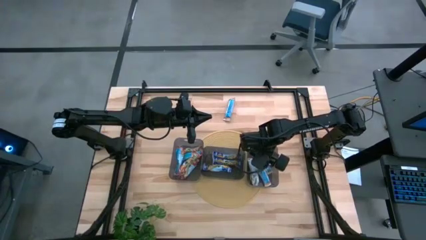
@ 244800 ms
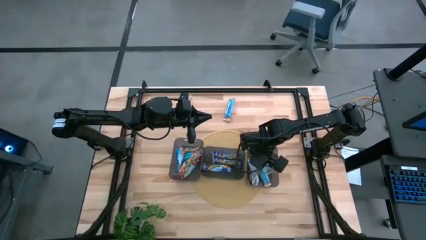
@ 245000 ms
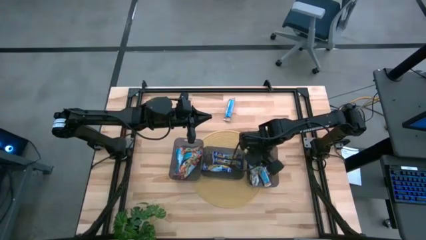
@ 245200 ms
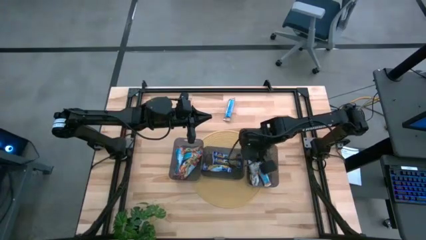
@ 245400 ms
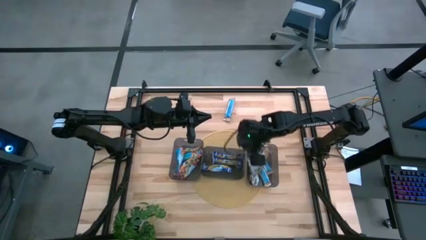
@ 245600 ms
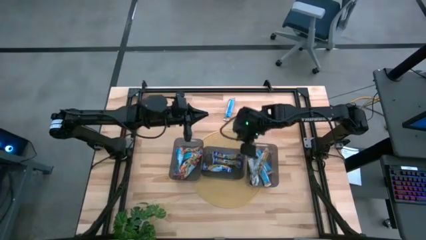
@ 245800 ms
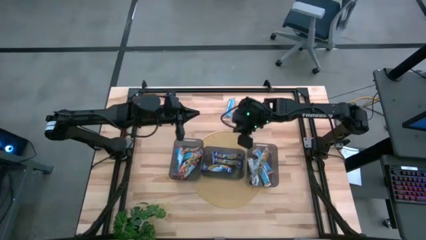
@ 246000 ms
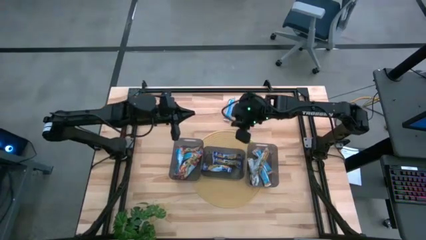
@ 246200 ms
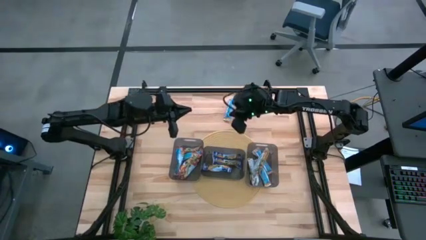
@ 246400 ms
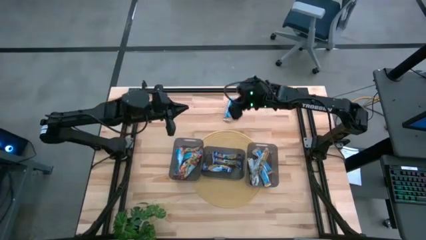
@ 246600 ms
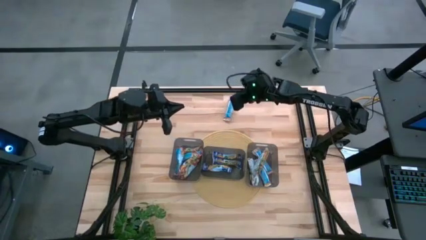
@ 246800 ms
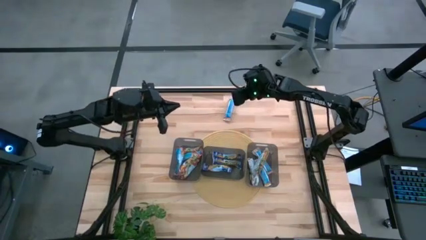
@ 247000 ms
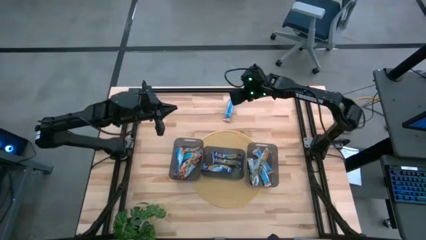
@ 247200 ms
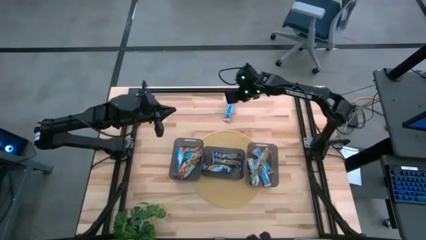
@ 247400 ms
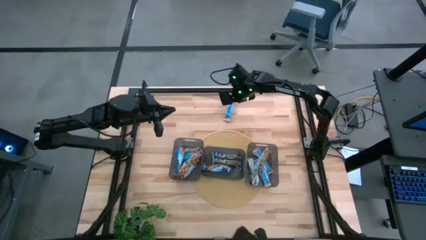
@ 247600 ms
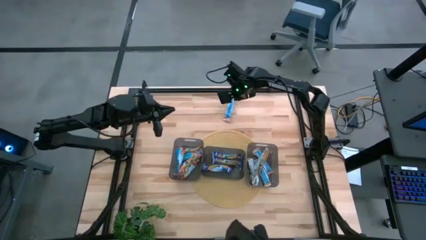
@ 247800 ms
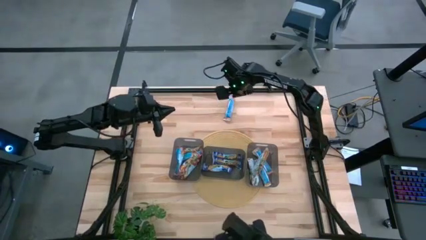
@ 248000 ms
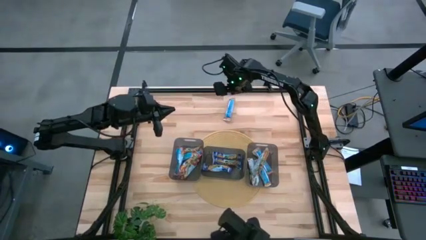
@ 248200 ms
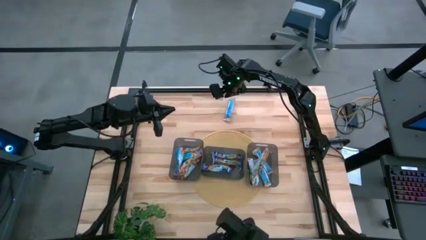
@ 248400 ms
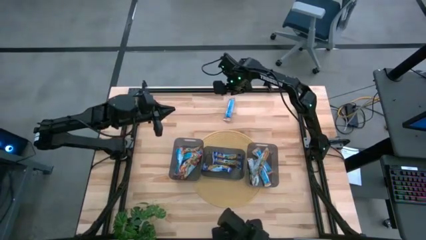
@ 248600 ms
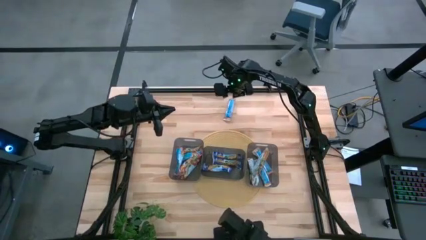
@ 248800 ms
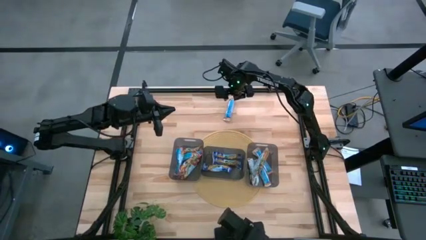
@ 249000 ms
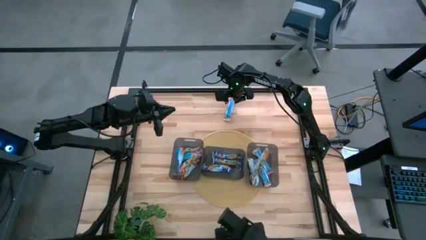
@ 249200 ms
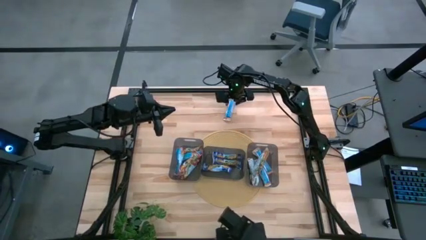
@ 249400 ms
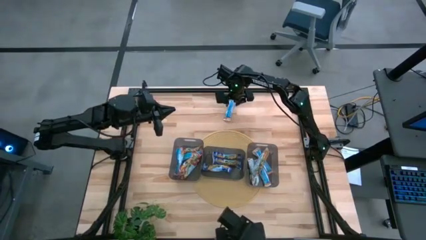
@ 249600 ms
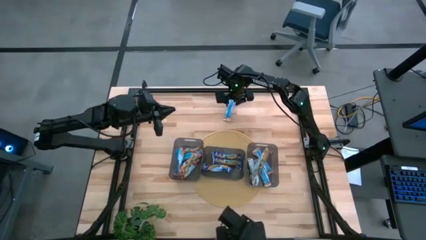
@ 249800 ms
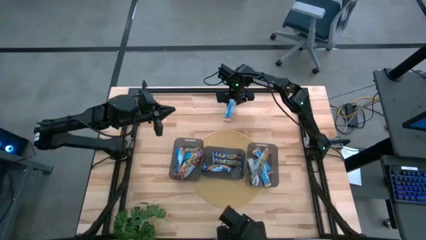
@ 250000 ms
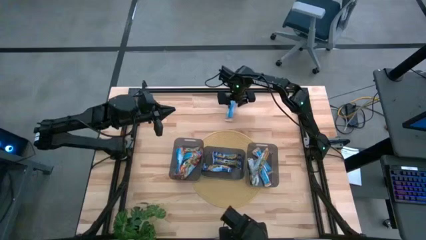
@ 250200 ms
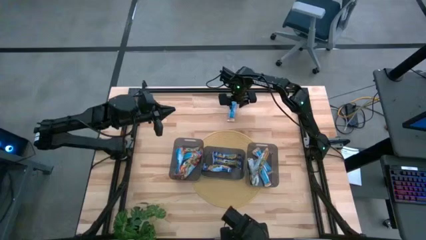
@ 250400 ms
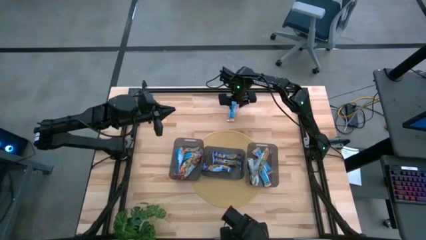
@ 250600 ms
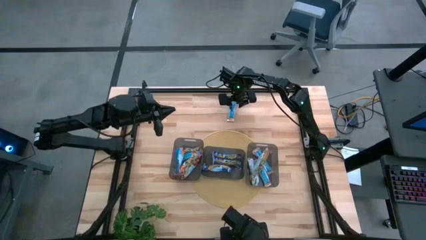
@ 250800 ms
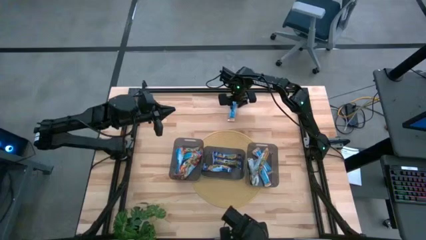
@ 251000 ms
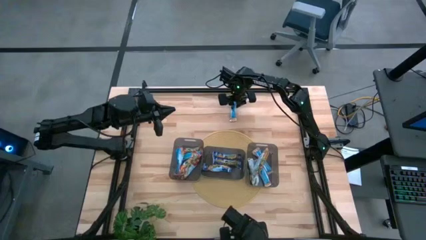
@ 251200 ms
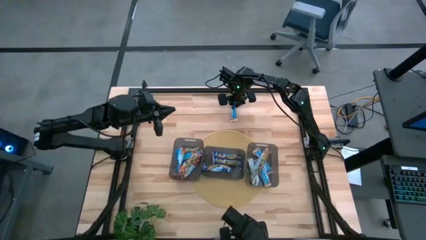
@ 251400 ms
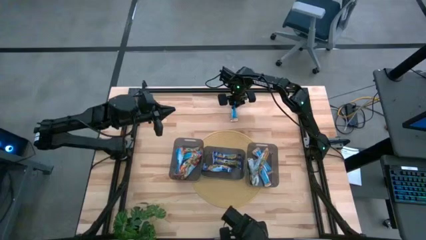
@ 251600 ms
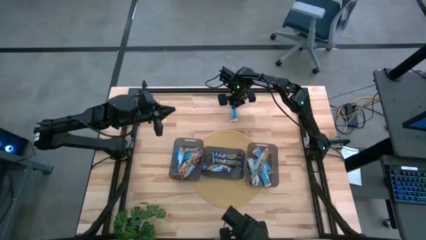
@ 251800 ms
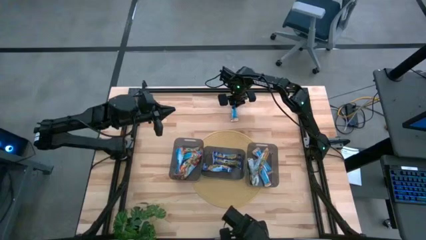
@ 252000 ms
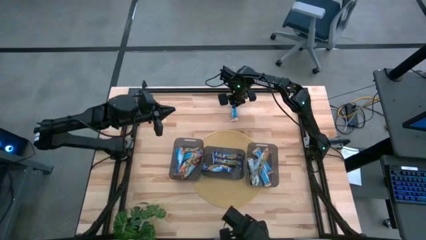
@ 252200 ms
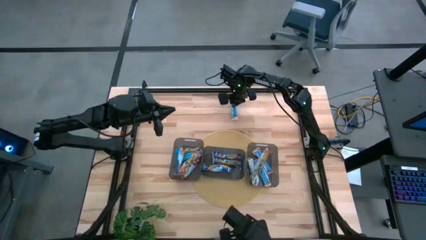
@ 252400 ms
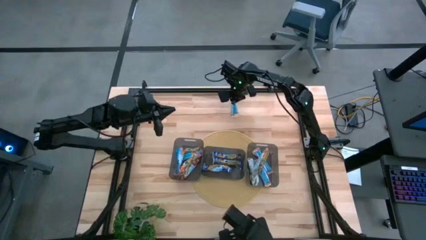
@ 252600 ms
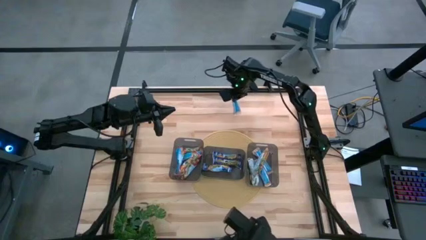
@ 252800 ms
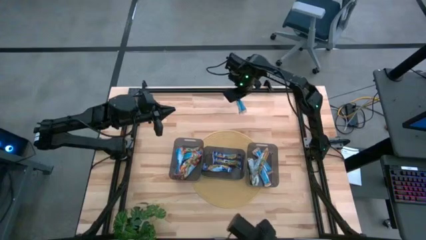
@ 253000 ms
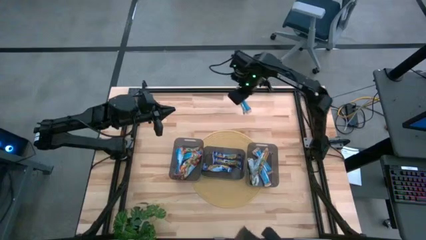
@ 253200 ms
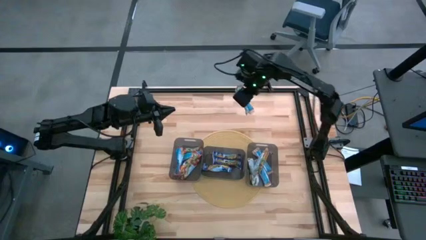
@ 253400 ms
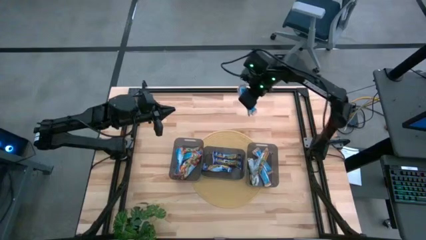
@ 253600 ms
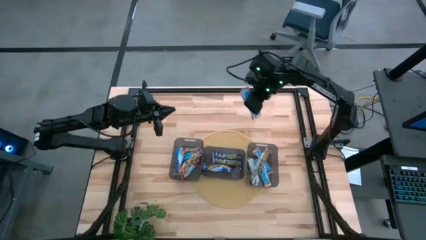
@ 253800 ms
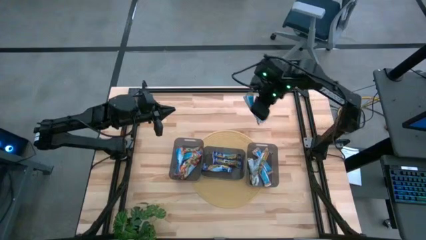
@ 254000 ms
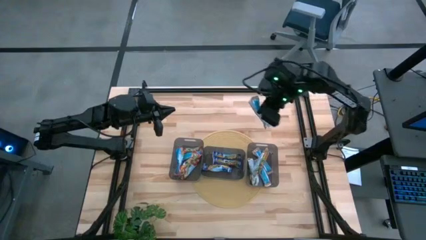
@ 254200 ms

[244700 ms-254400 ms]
Task: Pick and place Granola Bars by type
Put the orange granola bar into the right black bin

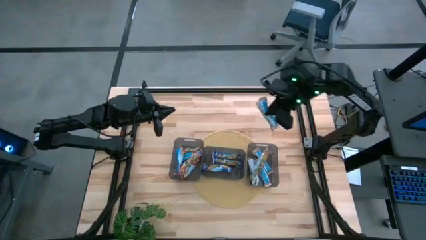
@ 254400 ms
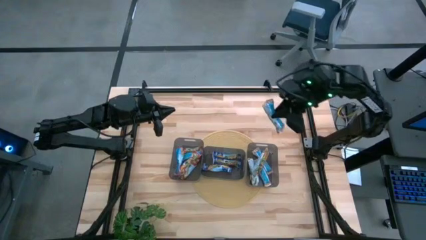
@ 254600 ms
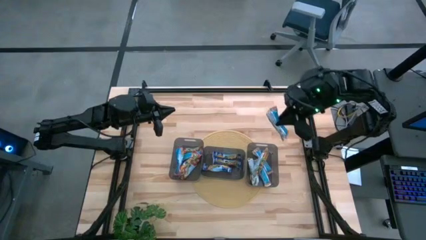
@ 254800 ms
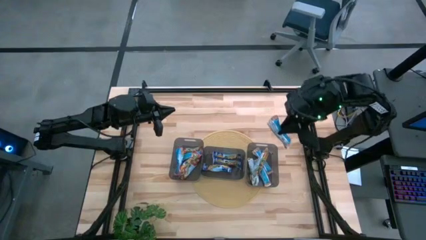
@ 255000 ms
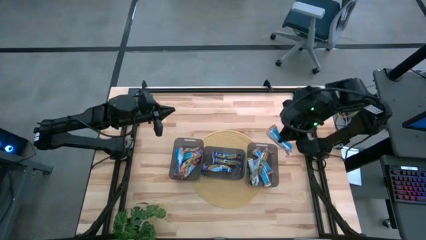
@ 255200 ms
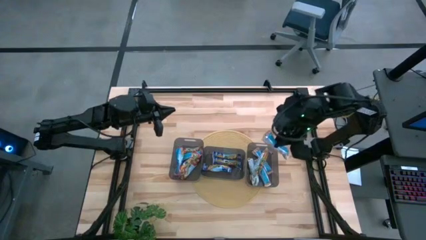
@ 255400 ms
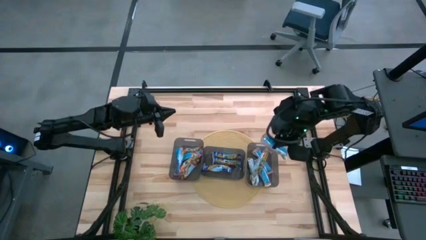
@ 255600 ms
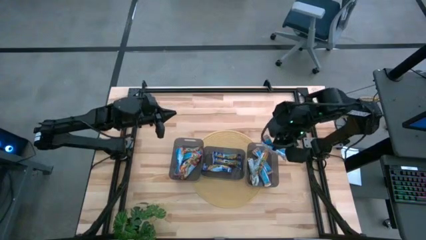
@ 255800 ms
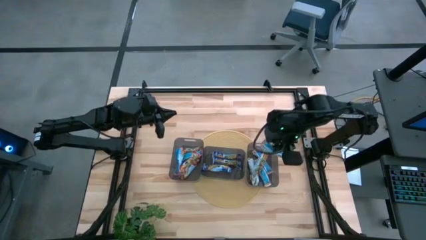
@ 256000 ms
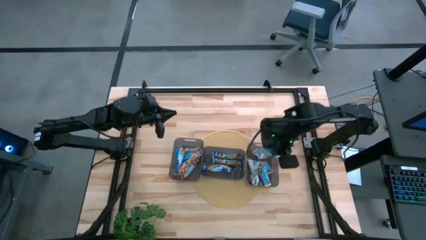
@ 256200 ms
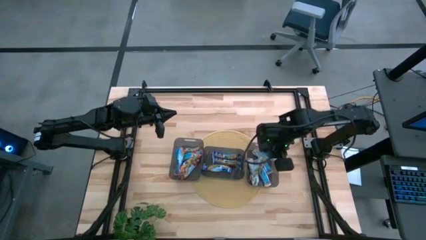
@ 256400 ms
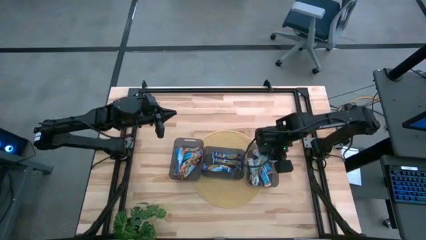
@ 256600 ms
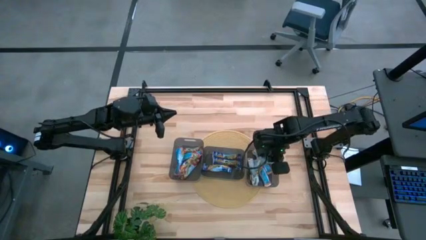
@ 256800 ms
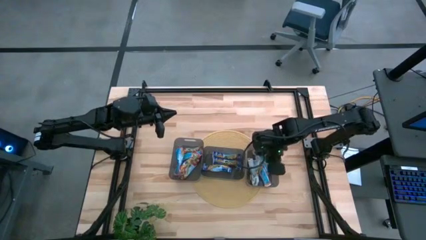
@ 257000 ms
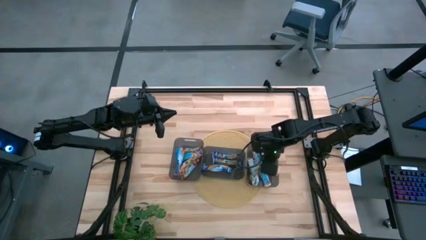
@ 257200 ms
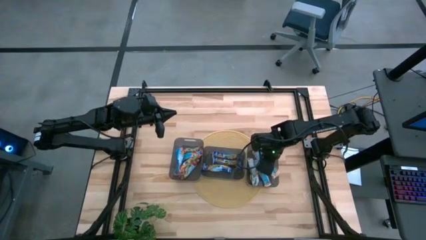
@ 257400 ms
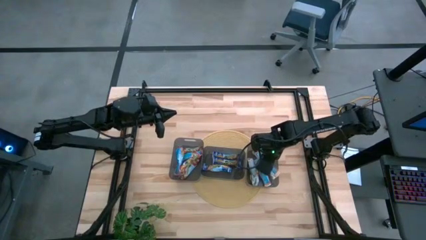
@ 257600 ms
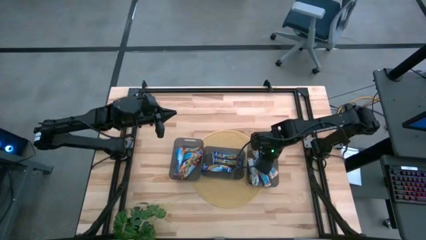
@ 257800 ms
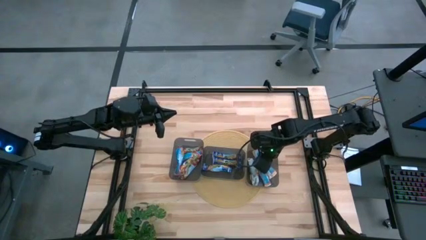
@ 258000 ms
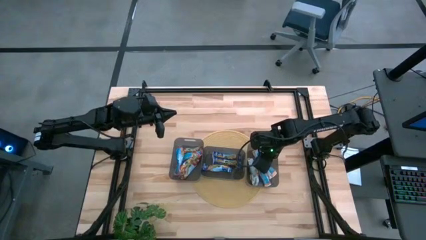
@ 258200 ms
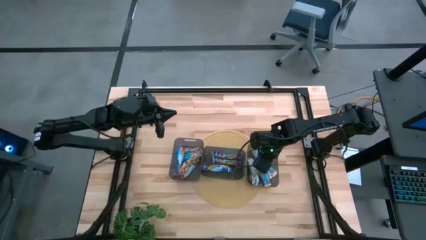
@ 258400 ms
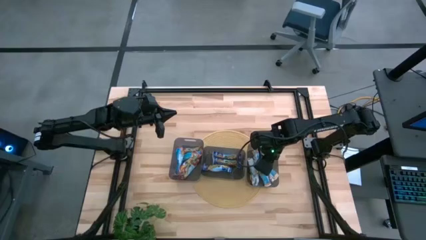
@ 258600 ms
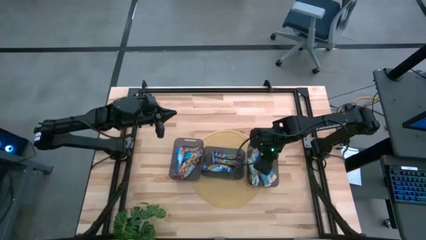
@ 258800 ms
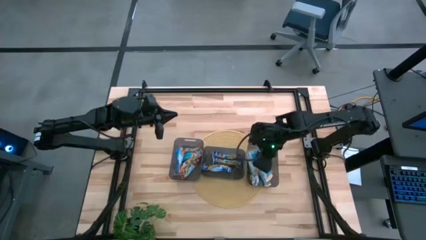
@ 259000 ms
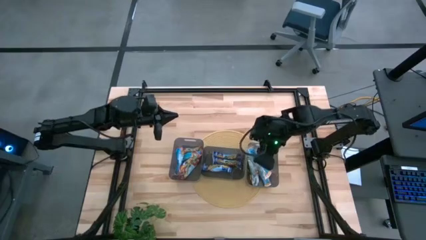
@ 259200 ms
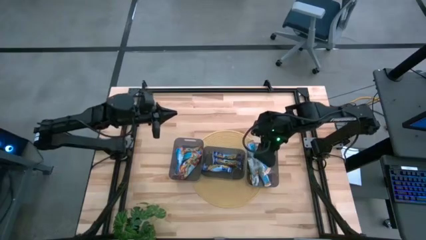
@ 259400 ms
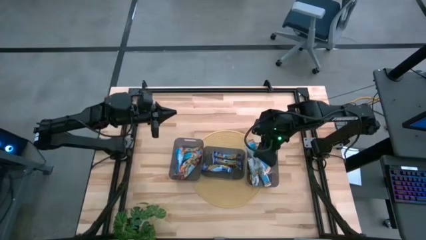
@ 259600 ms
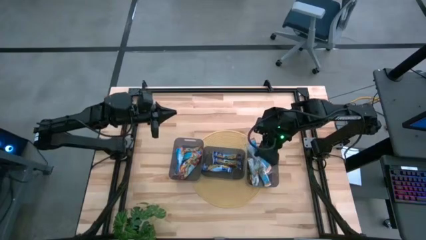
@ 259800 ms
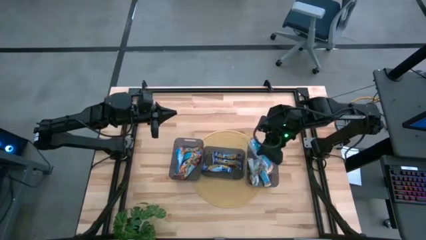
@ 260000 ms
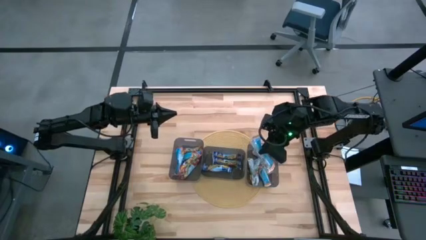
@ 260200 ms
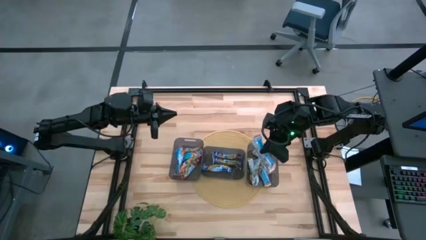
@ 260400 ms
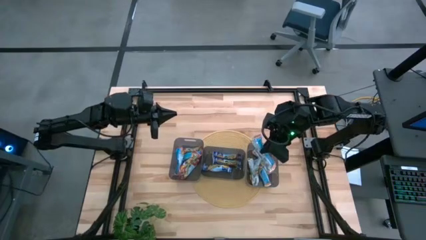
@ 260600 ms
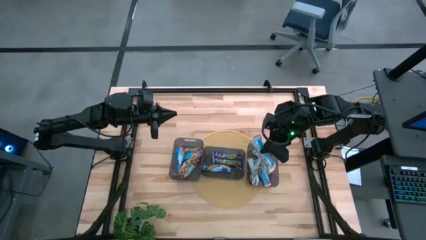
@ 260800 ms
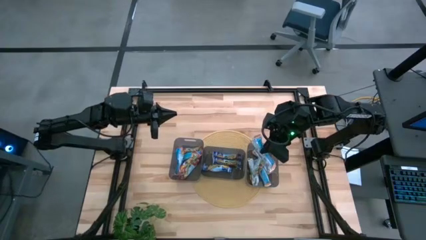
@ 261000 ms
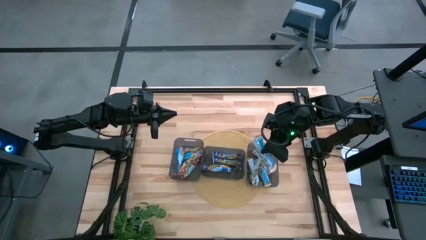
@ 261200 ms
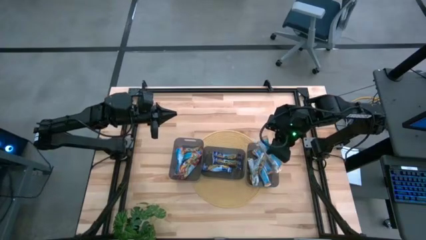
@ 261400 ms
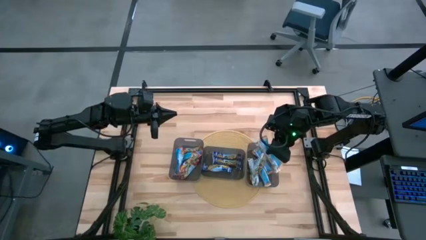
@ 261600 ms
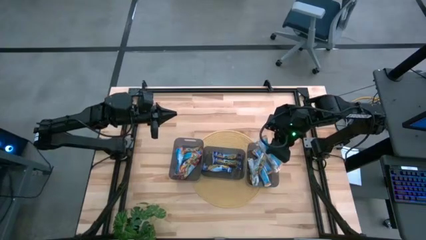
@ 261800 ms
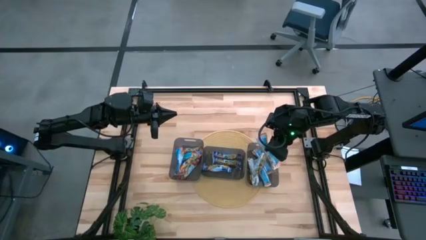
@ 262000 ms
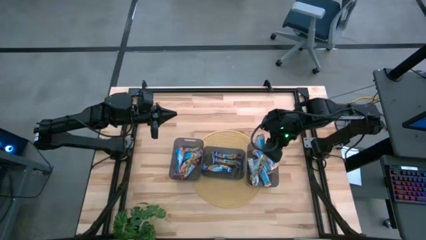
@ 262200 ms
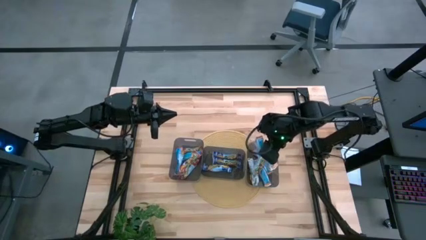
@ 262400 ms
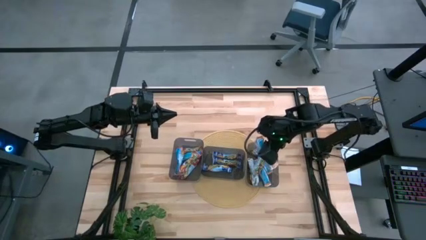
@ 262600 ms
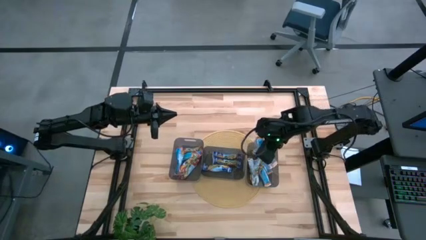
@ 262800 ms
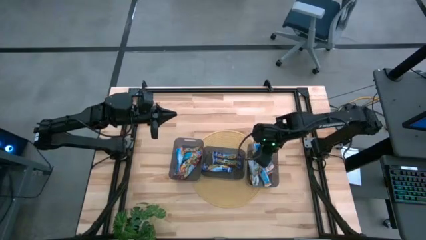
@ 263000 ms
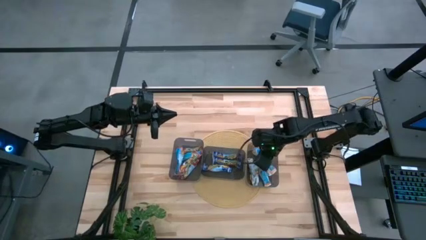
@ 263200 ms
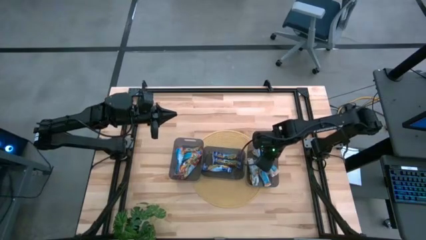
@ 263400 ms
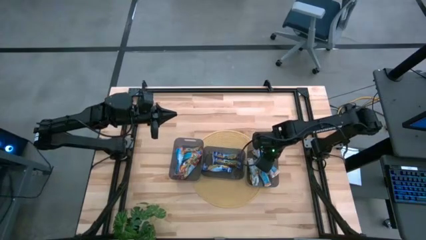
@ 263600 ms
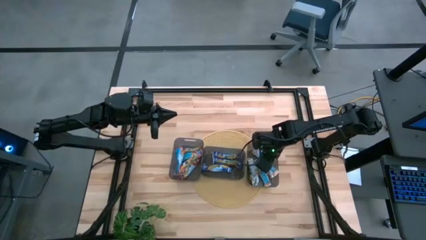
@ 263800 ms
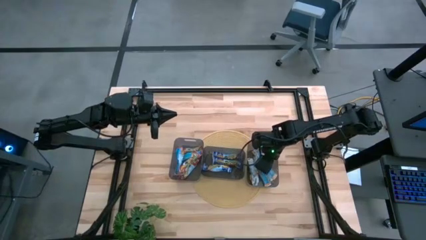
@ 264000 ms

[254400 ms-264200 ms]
Put the orange granola bar into the right black bin
